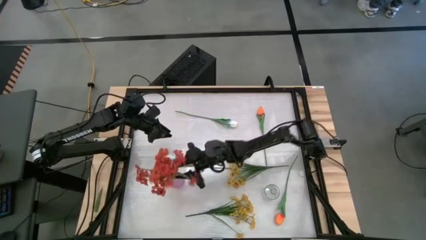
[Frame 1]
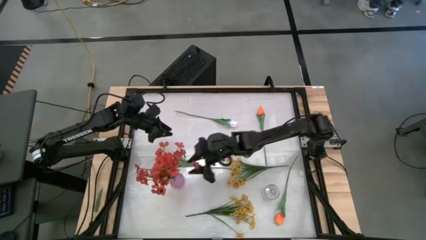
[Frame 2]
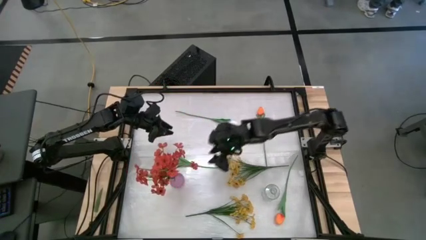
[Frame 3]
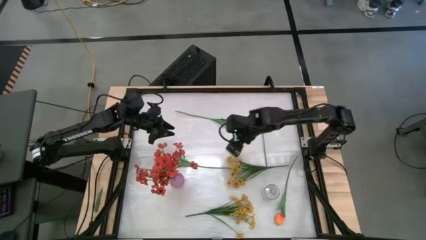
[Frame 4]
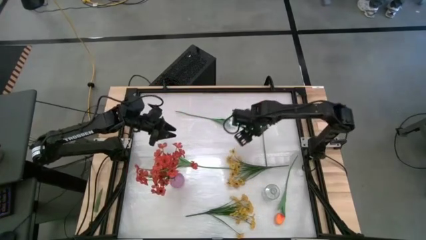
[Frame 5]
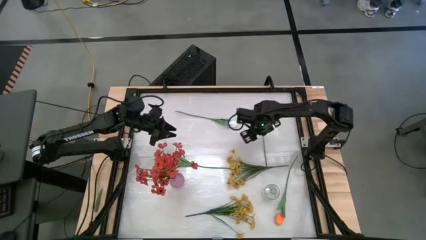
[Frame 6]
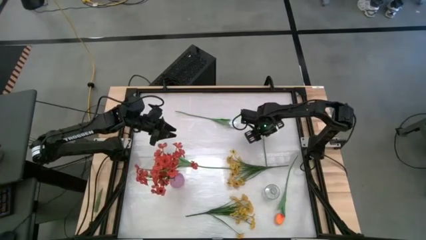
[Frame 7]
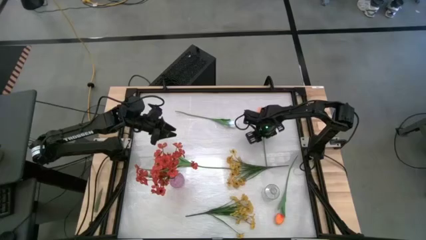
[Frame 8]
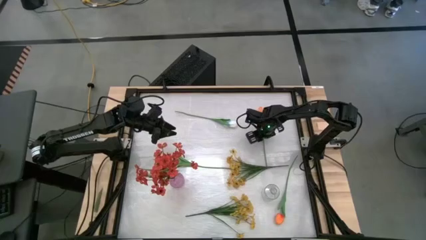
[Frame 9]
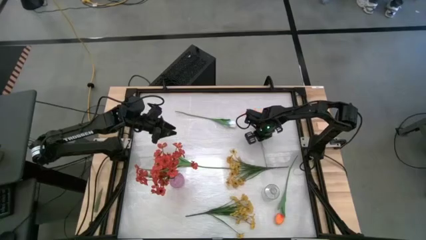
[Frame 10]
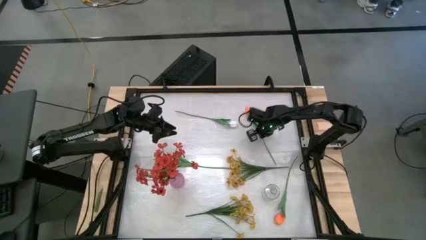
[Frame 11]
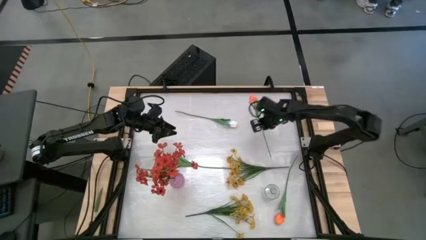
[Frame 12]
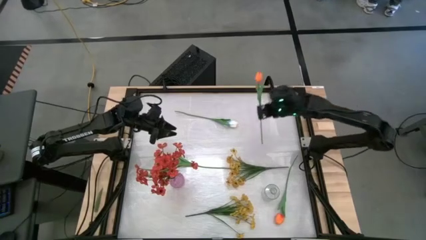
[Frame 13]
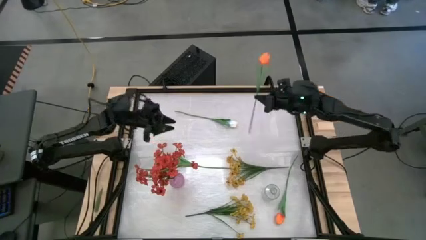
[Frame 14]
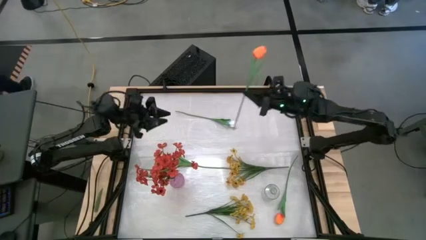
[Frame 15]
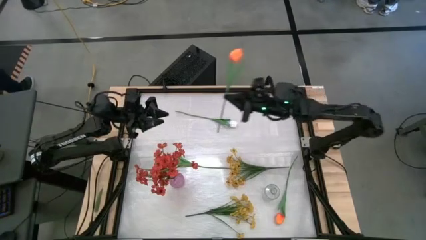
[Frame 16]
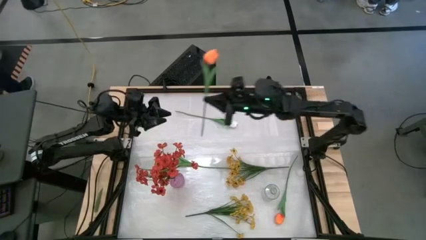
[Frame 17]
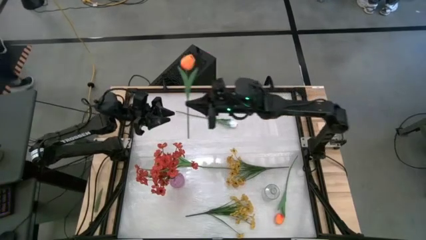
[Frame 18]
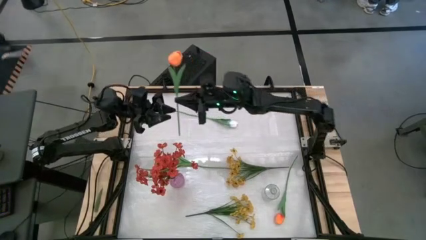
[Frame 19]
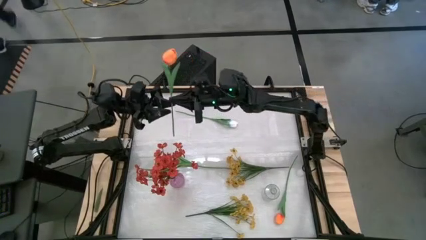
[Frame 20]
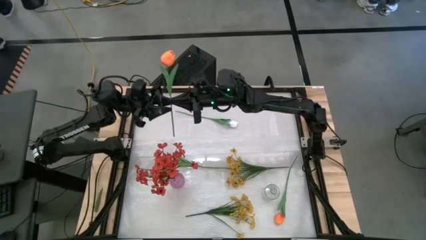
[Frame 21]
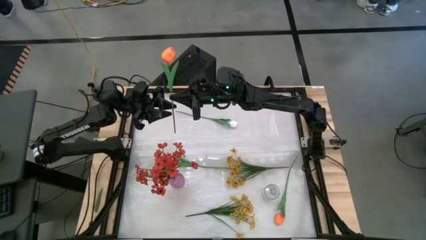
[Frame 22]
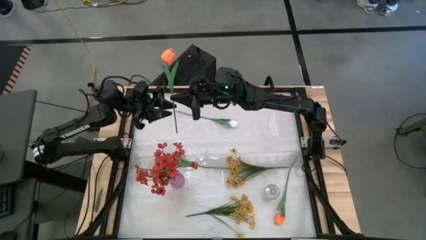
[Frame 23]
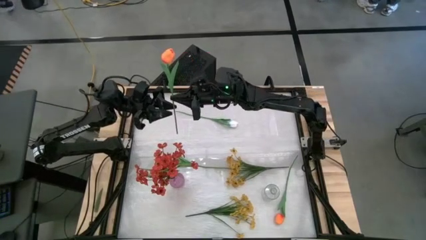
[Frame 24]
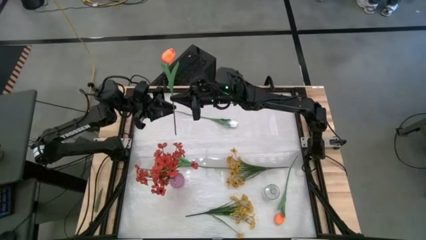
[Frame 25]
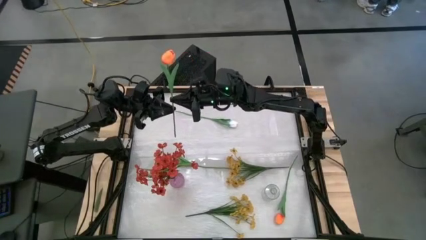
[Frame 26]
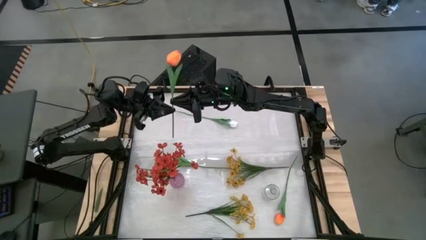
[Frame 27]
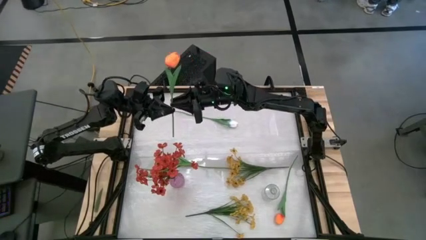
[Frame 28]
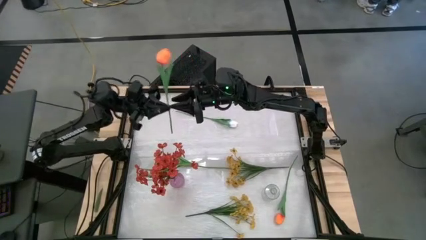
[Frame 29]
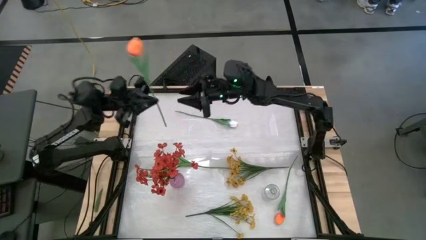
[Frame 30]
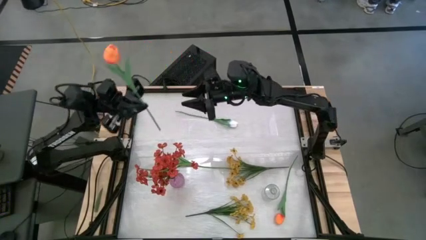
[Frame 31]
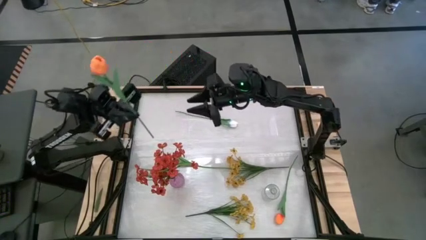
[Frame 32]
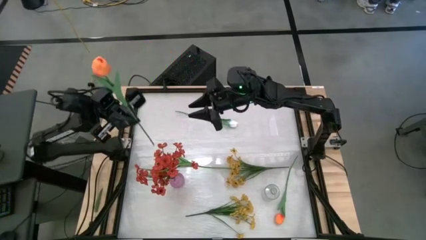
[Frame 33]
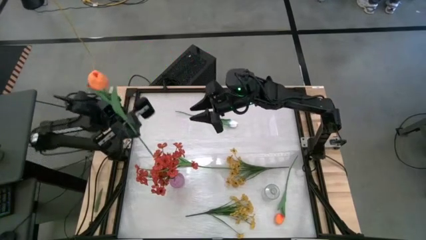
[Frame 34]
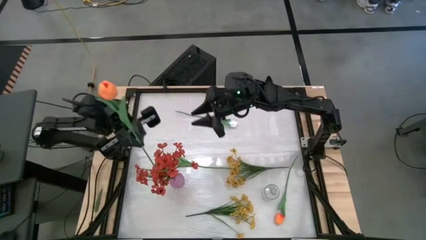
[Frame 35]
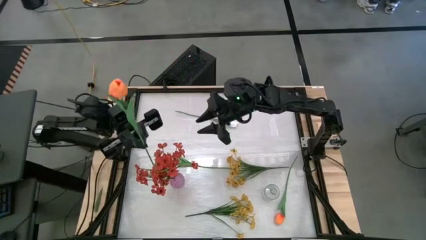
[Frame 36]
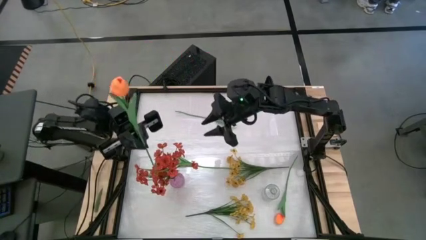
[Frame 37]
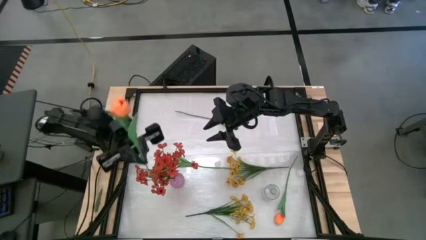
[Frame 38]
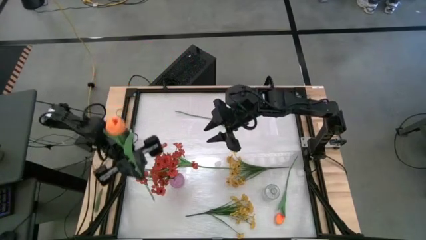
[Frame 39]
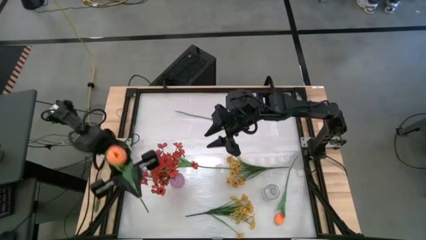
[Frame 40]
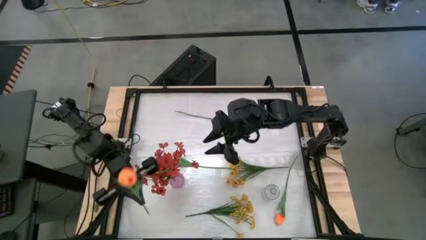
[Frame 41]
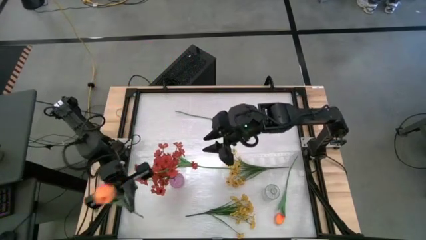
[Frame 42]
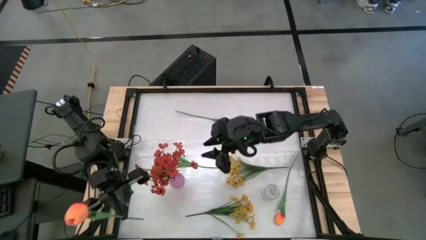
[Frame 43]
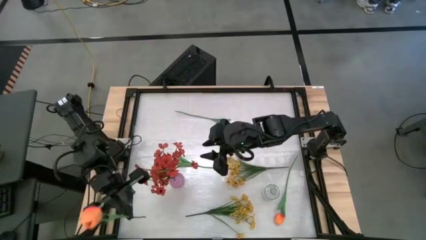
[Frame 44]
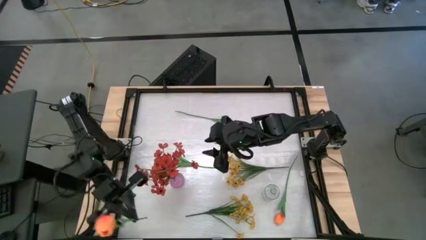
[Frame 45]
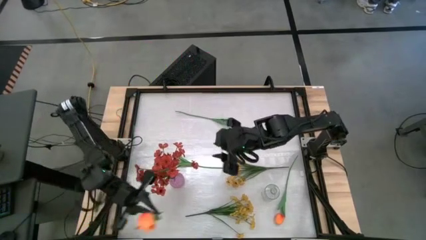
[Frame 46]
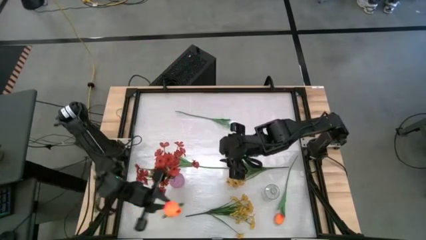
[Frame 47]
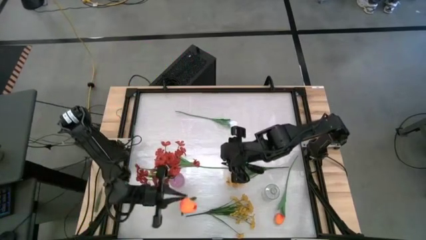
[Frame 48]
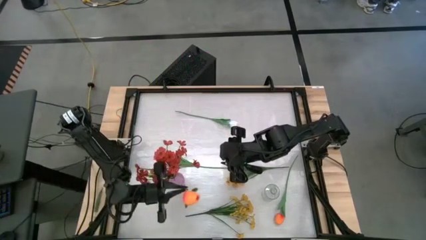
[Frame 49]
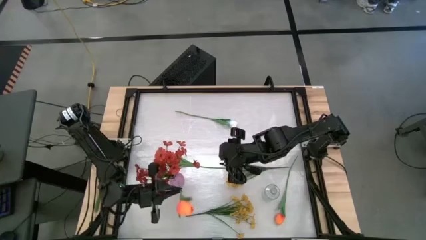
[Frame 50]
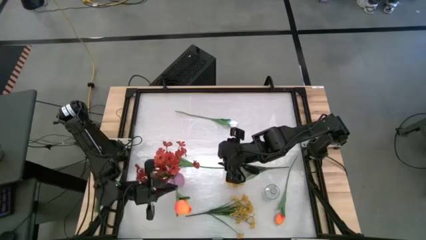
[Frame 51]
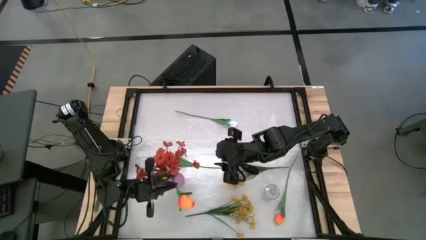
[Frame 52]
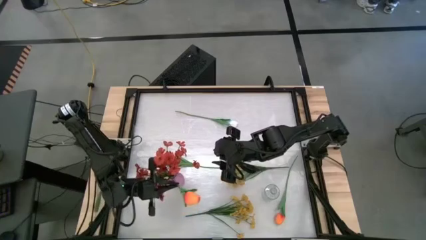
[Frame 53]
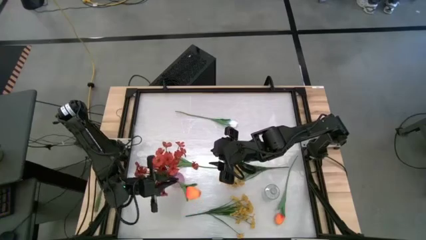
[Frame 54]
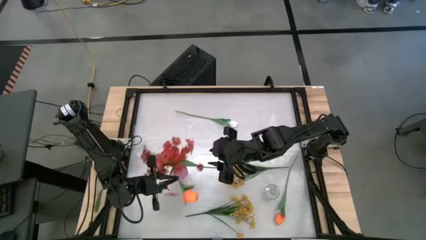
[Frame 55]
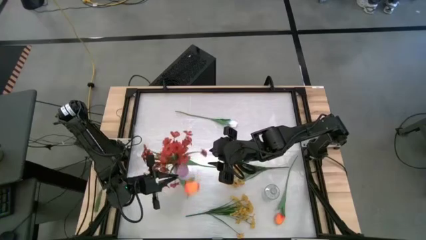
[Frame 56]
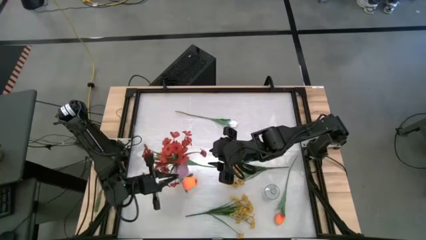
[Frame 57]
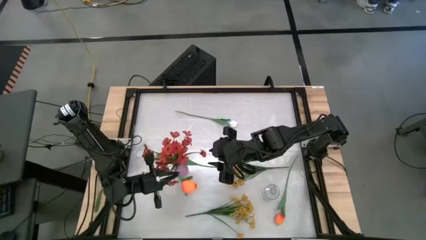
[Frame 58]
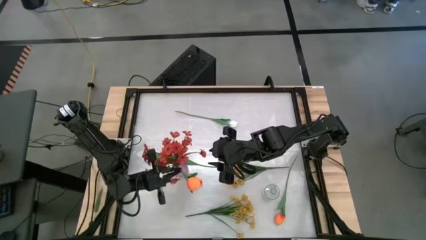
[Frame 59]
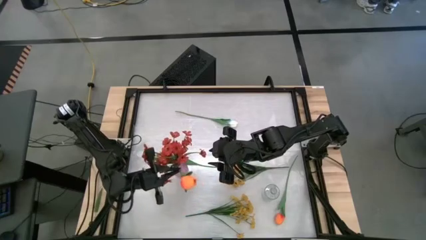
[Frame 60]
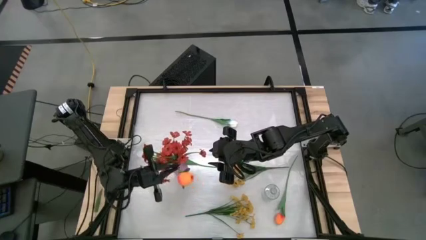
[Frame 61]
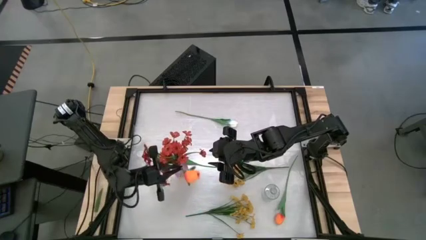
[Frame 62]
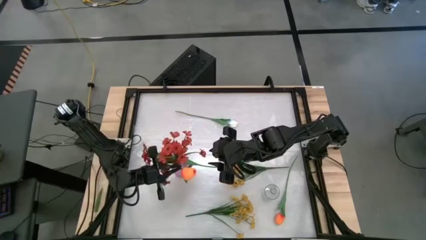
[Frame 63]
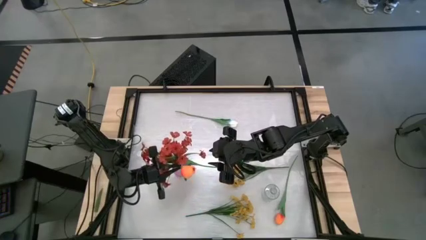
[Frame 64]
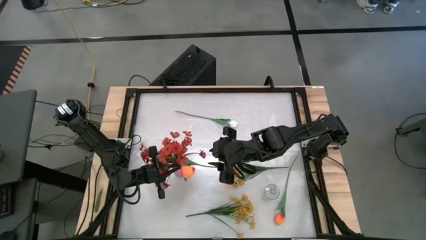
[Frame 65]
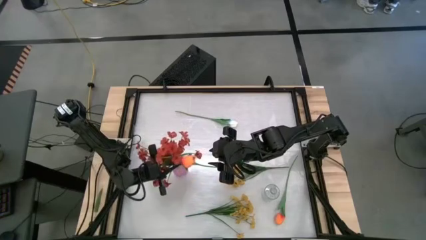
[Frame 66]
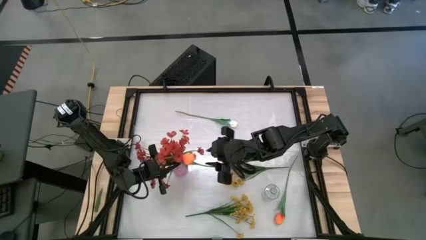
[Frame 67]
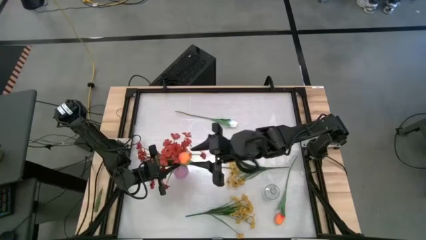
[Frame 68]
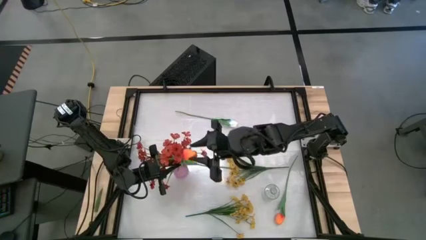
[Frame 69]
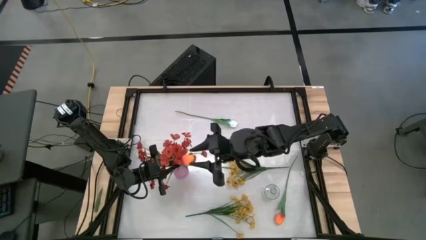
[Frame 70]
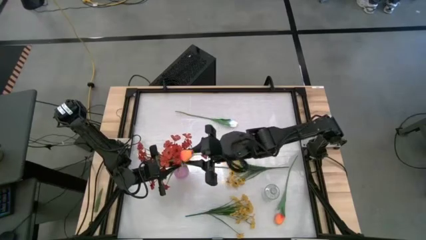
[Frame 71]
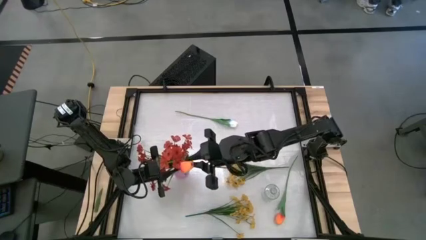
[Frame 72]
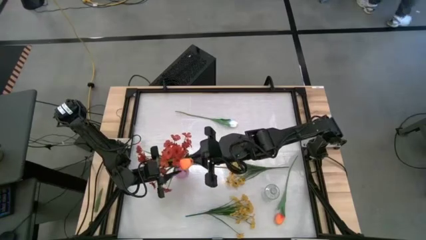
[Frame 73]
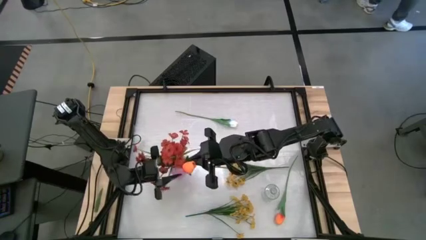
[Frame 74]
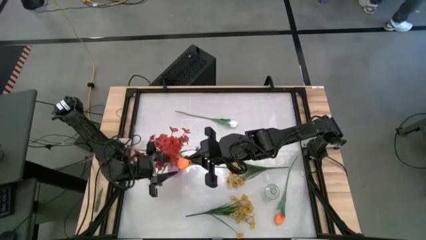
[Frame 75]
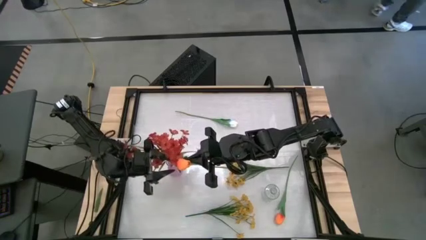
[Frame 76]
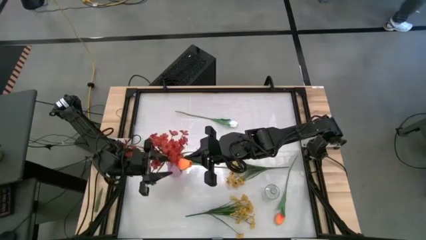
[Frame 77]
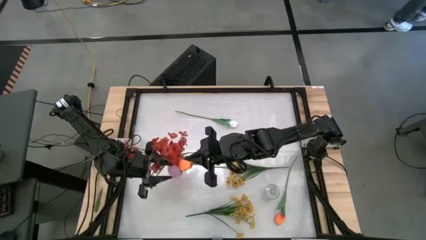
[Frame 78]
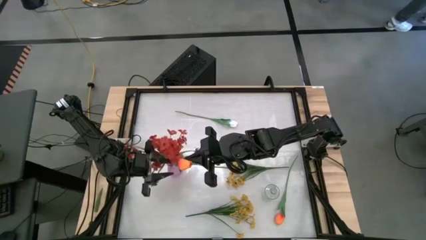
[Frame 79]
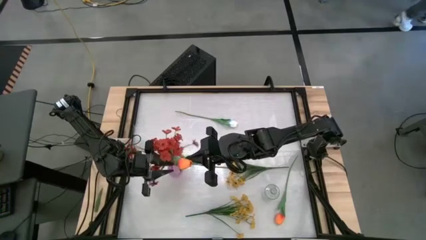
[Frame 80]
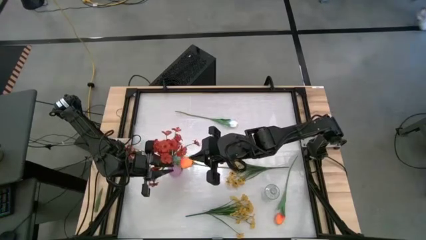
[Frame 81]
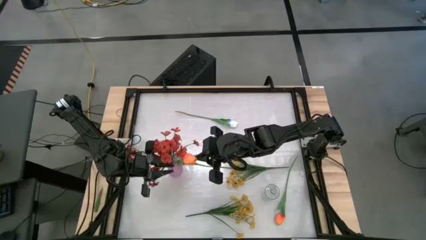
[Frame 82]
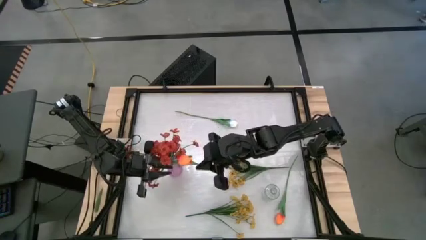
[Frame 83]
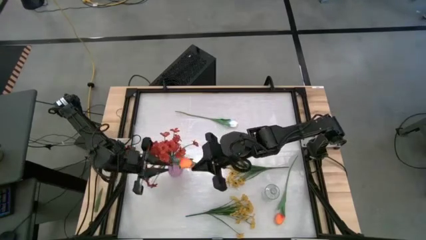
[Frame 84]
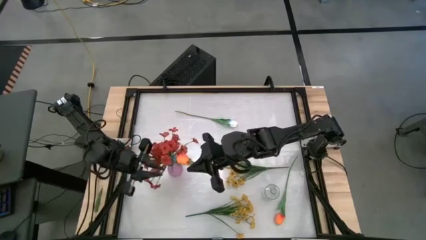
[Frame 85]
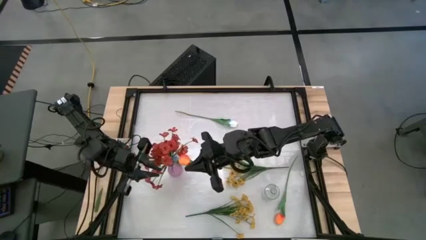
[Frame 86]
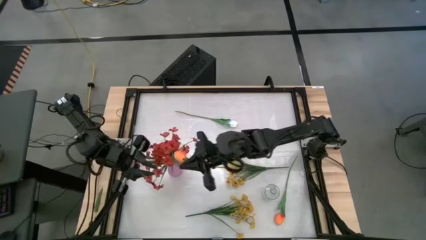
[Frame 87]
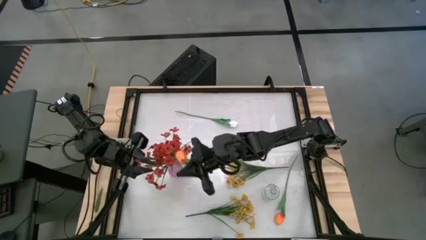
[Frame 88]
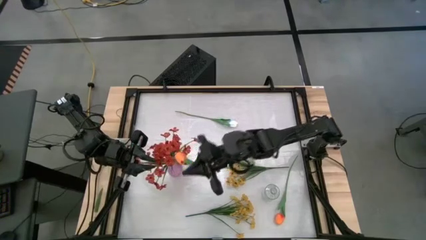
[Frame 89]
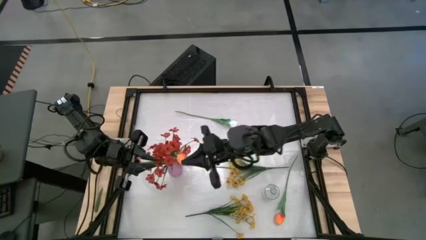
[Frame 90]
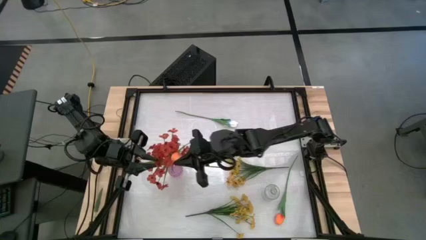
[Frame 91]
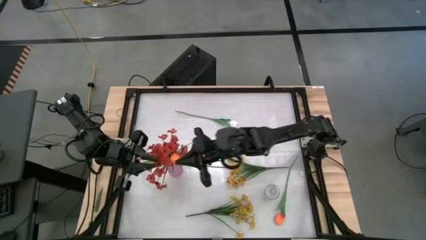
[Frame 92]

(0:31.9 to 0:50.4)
Task: Sort flowers into vase by color
Put the top orange flower into the purple vase
